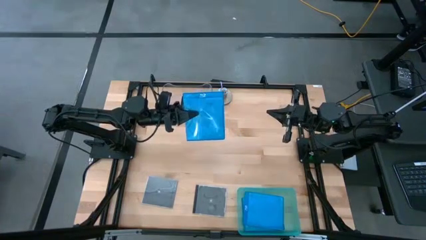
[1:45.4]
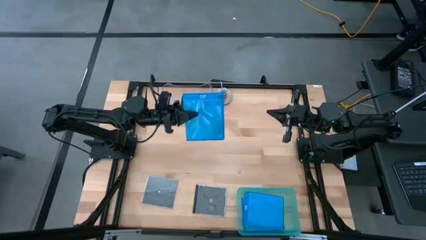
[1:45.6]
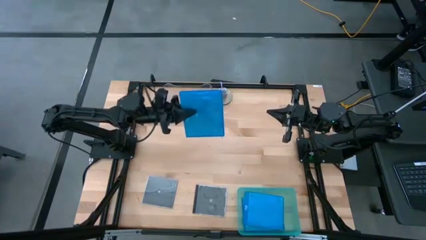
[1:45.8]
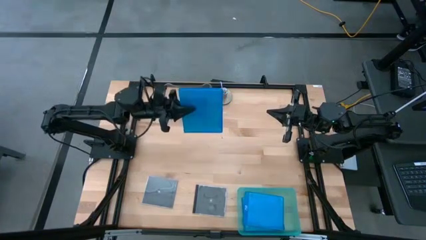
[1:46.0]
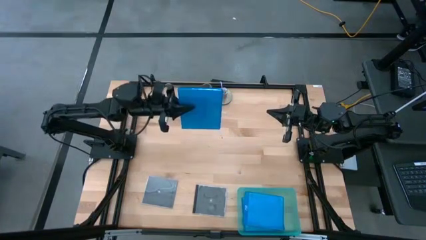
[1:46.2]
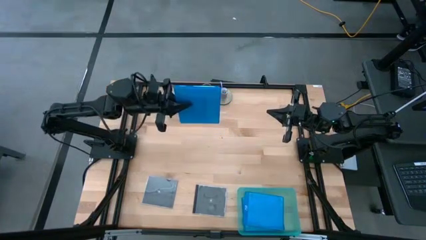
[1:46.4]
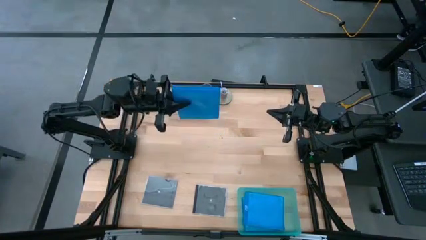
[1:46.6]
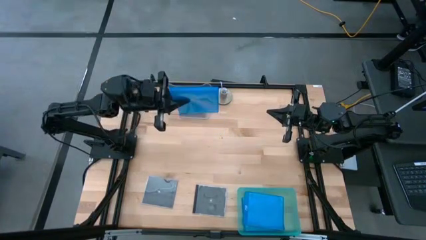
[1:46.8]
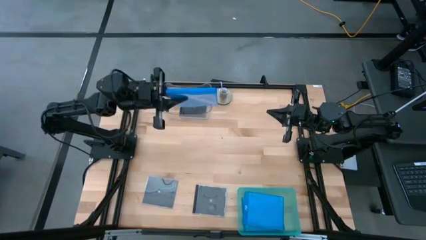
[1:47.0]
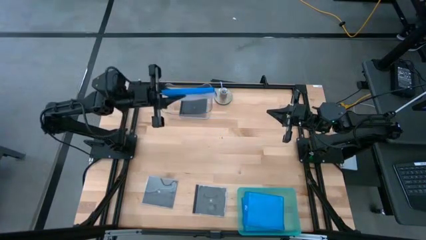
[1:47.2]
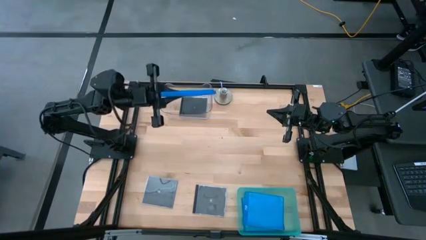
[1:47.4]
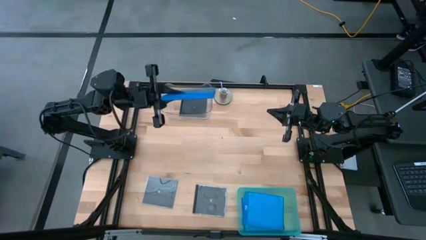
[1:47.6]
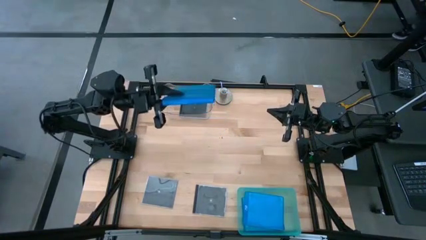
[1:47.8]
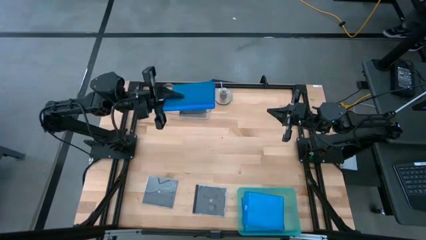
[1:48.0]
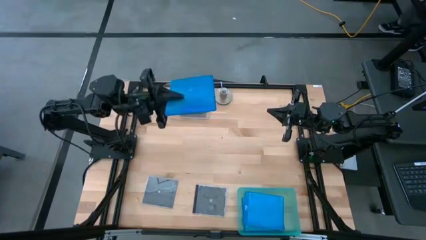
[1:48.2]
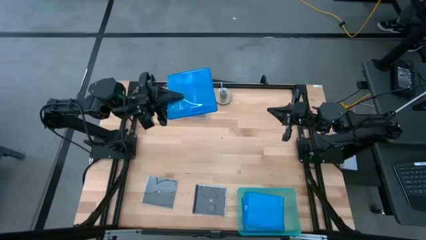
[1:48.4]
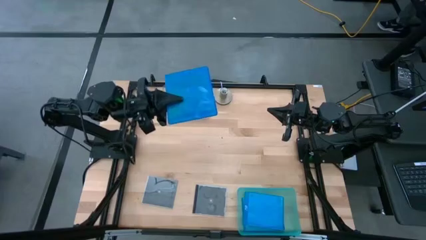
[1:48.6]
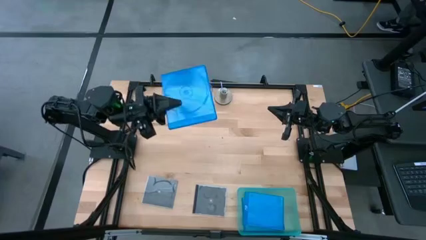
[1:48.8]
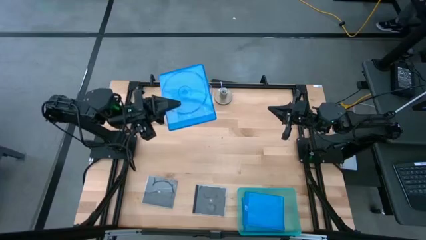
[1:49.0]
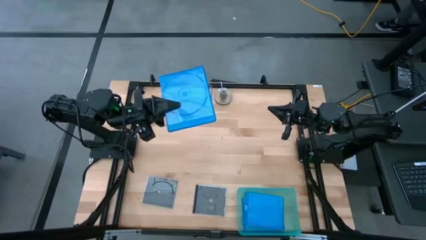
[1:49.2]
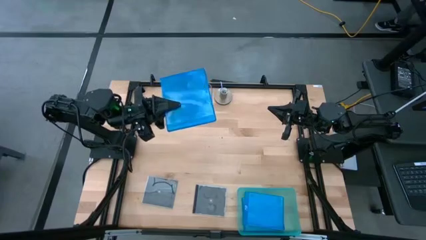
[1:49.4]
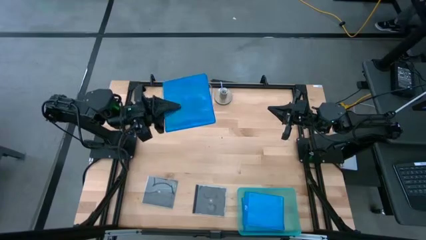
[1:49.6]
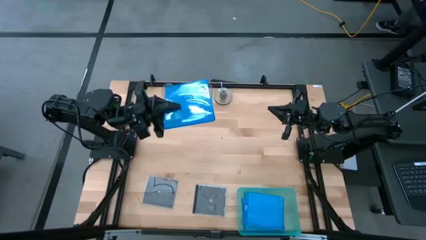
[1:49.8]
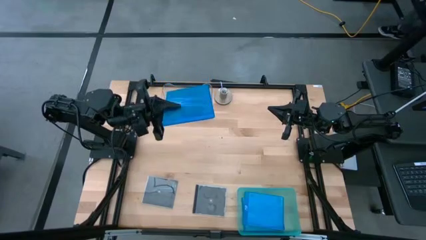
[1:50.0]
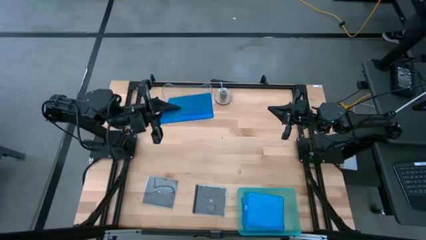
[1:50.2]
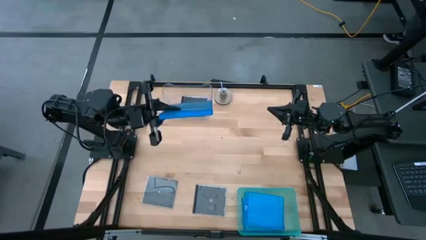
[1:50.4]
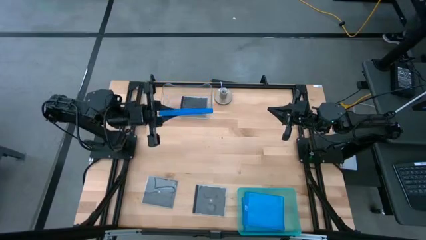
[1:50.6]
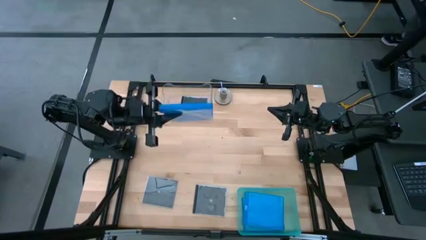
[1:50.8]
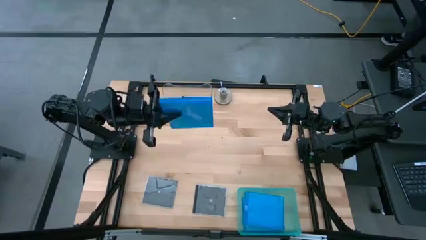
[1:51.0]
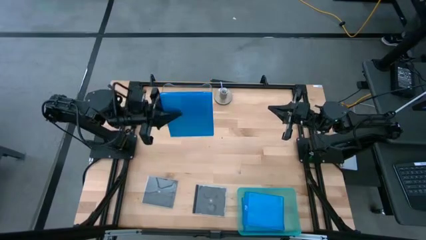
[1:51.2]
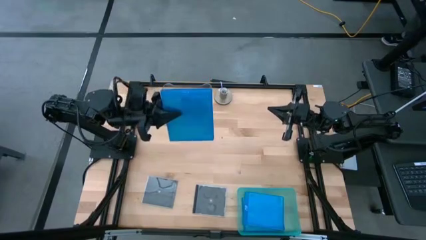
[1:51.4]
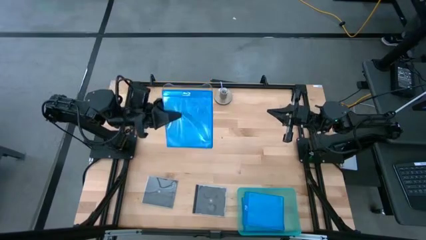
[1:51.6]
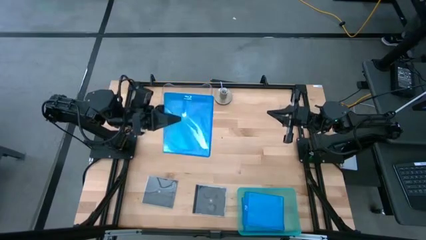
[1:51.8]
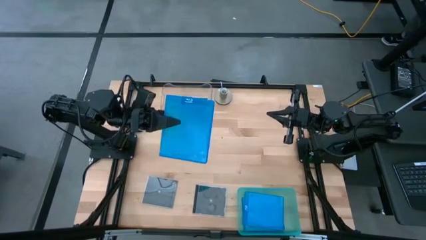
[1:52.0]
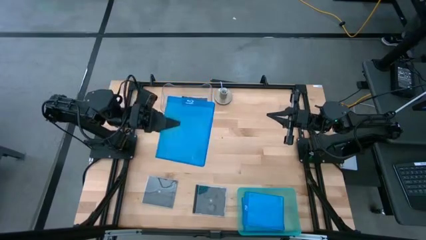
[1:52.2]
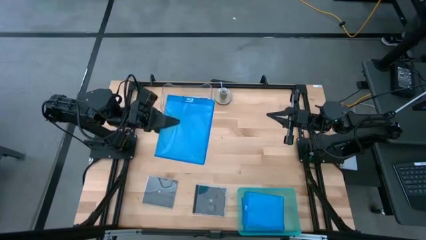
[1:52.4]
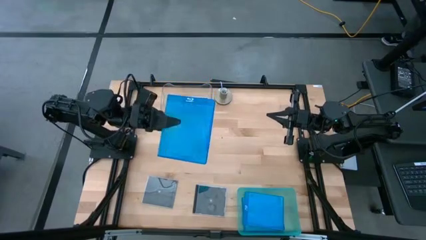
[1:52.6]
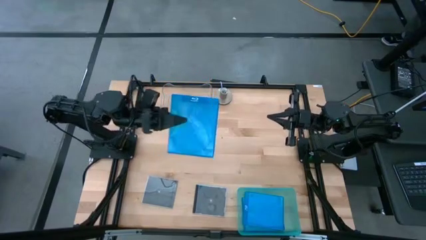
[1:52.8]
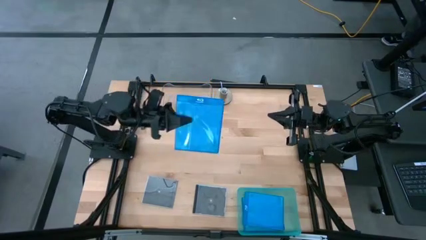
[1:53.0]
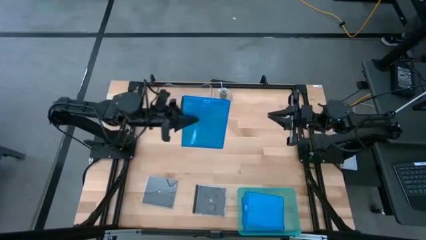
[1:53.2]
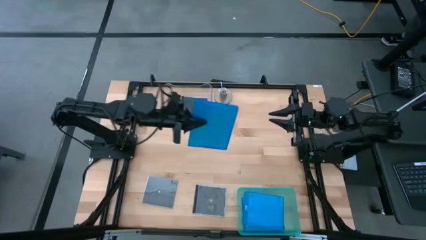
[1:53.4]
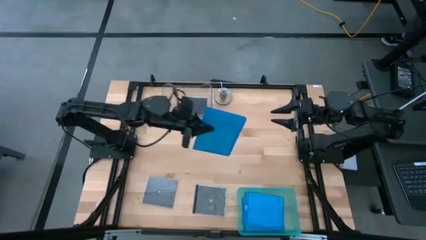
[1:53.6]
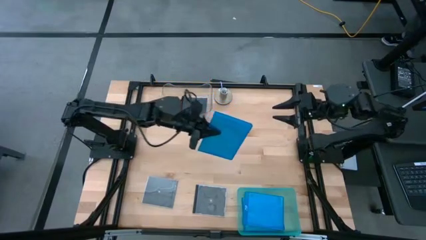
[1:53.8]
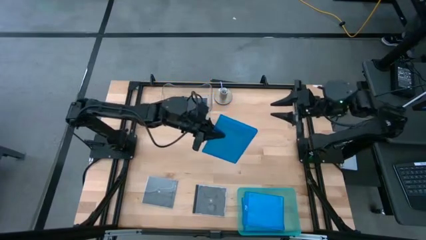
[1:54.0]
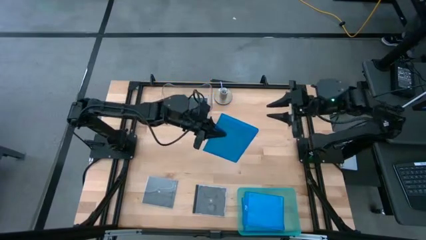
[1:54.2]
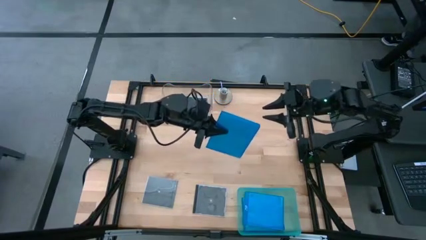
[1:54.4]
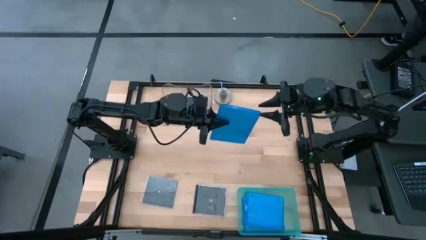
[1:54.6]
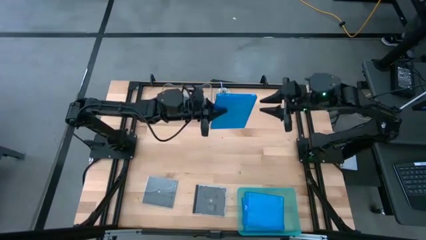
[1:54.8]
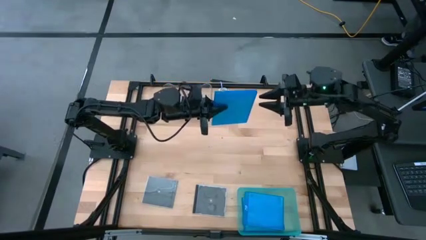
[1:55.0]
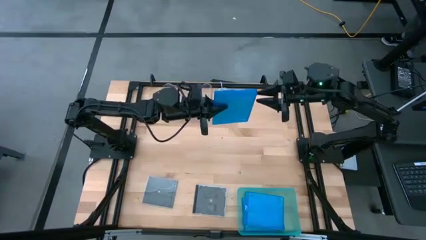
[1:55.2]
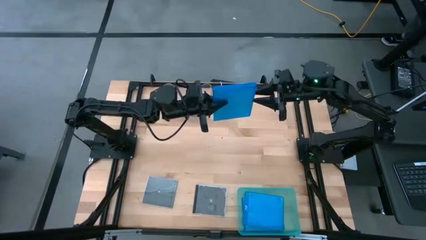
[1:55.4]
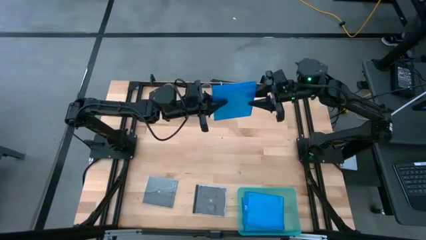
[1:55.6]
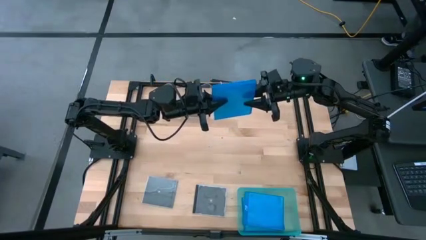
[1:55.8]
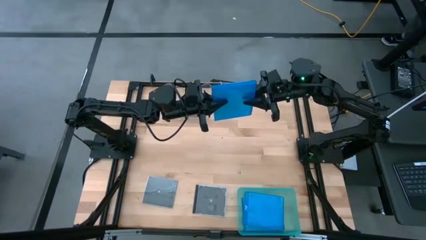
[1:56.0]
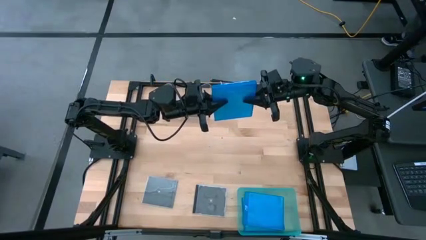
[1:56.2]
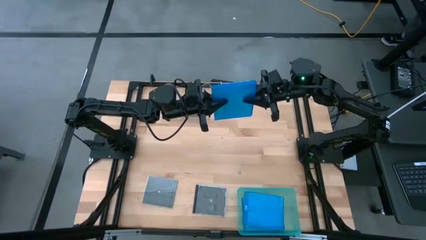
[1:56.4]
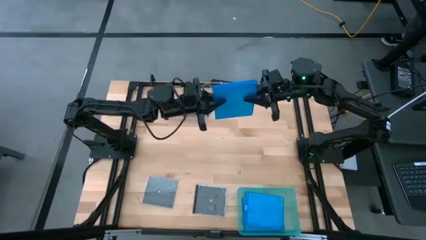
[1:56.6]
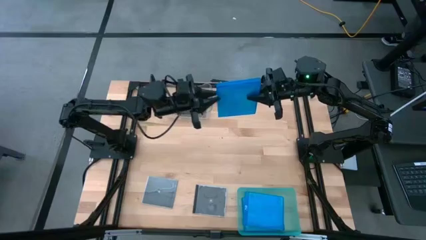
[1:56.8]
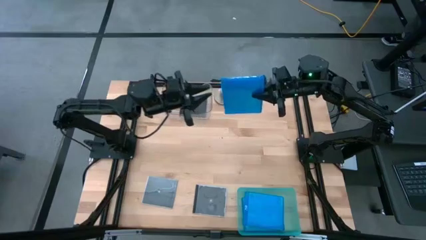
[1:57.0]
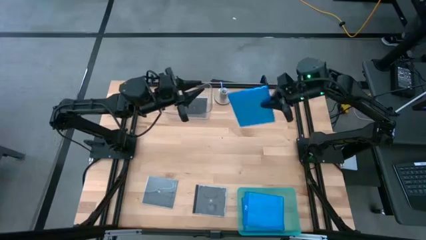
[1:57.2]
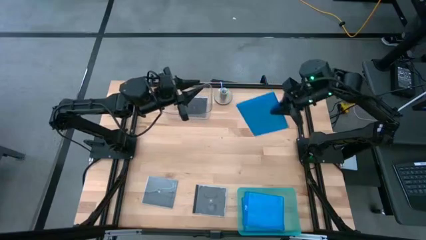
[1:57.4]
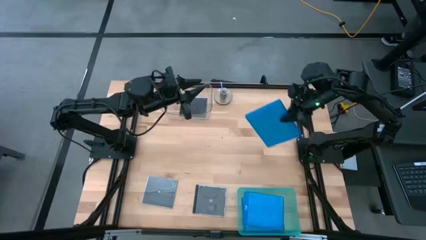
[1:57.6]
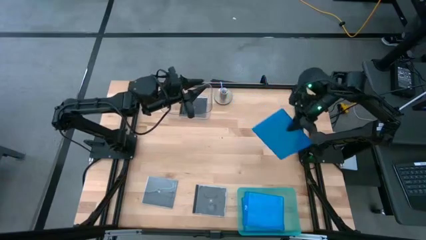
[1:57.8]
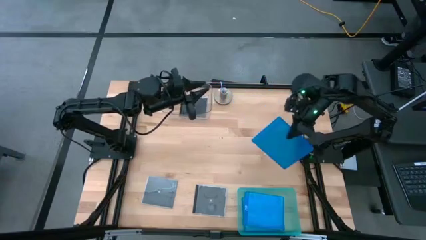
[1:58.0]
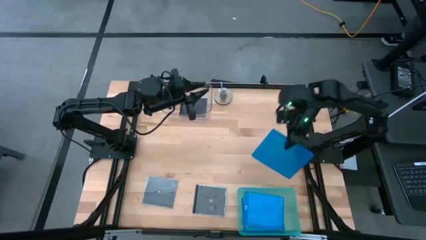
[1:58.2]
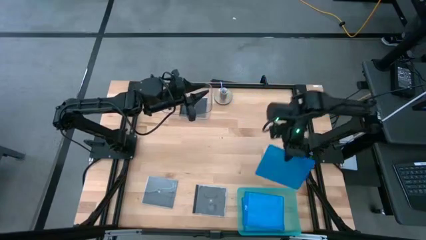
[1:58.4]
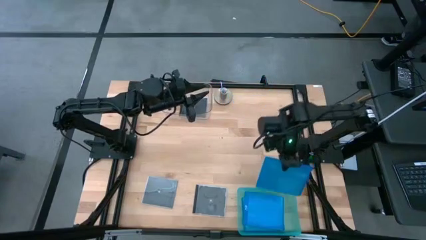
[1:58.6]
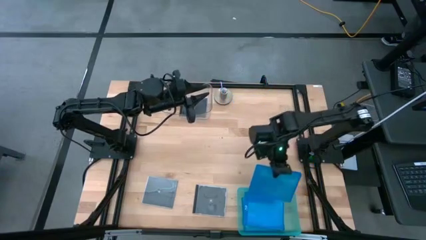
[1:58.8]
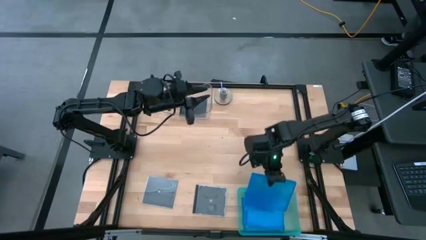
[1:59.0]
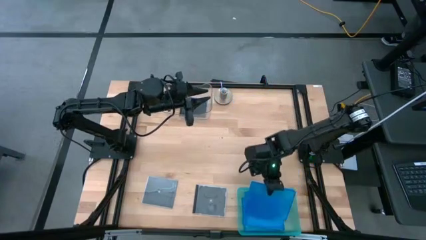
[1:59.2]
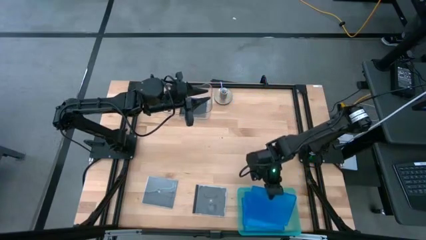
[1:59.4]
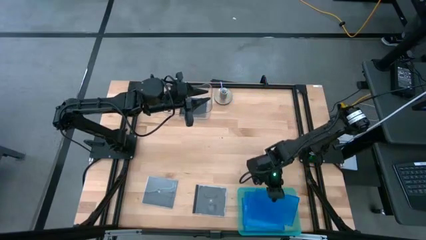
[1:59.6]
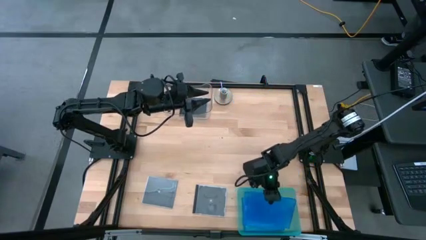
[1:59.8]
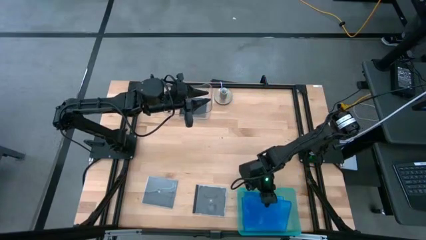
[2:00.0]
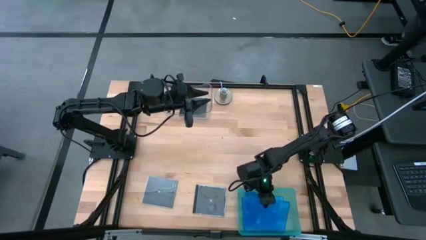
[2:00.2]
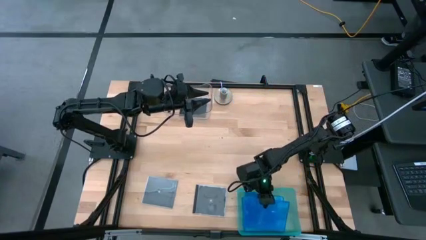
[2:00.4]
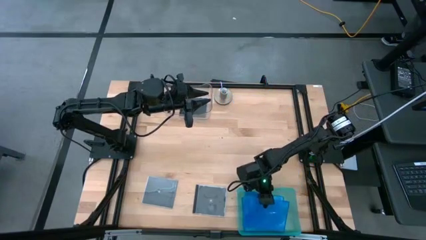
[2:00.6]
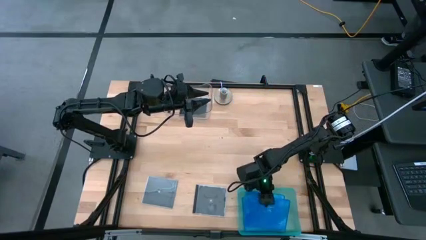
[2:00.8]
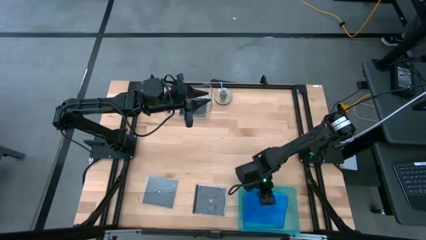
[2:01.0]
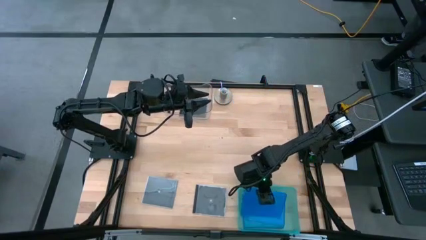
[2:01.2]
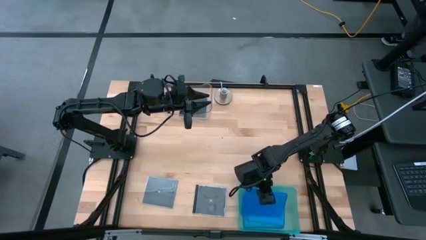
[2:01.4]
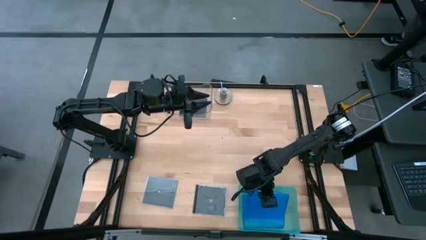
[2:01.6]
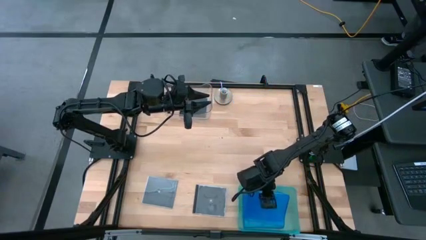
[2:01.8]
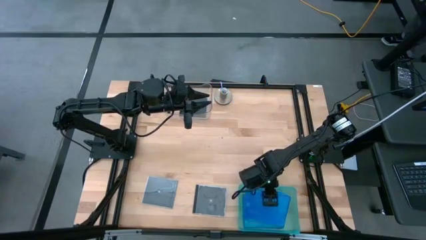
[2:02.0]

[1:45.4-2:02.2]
Task: Pick & place jewel cases by type
Put the blue cd case into the green bin
